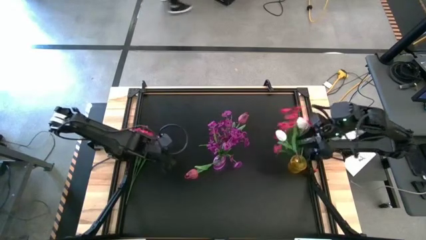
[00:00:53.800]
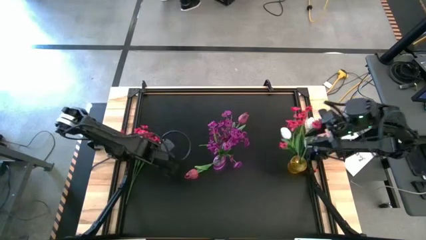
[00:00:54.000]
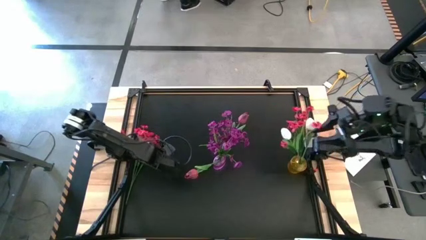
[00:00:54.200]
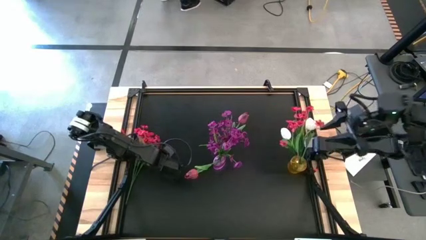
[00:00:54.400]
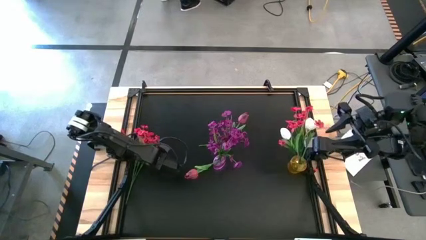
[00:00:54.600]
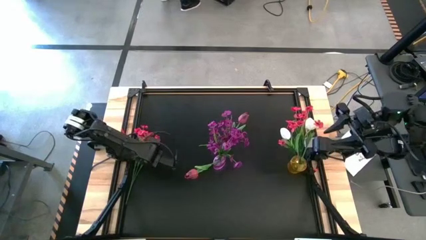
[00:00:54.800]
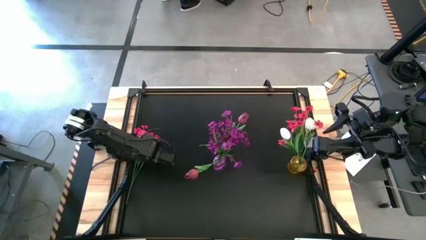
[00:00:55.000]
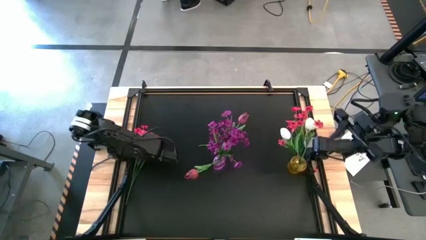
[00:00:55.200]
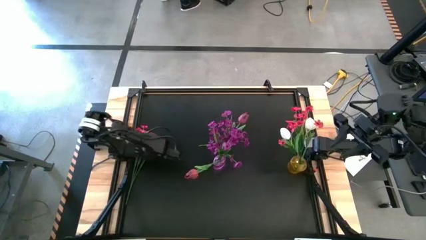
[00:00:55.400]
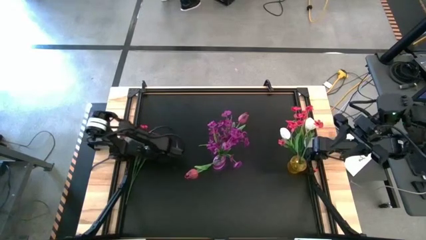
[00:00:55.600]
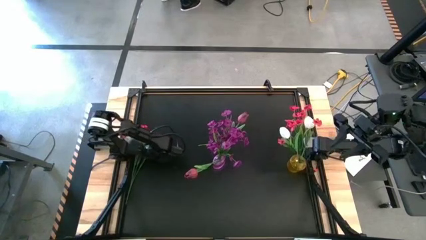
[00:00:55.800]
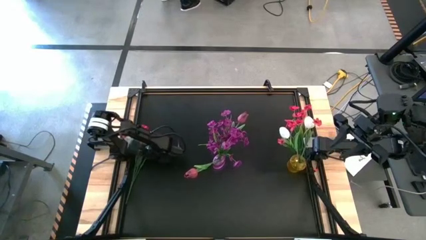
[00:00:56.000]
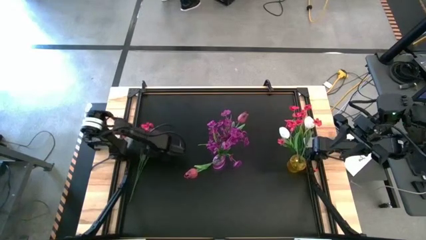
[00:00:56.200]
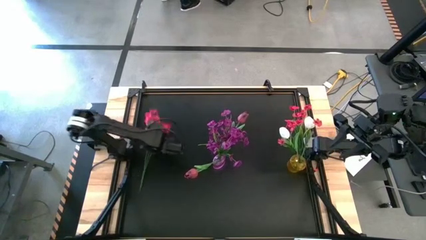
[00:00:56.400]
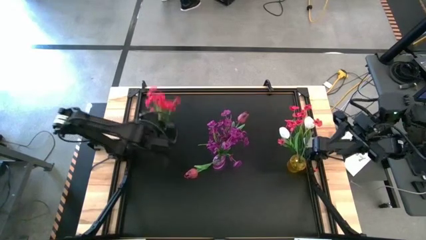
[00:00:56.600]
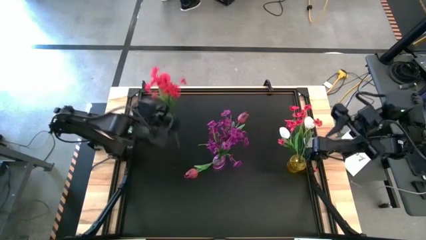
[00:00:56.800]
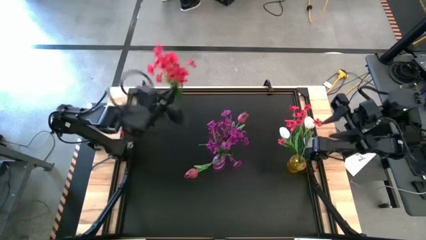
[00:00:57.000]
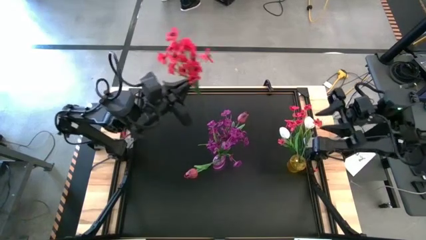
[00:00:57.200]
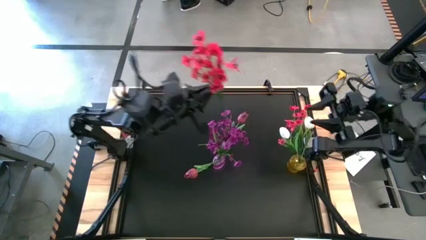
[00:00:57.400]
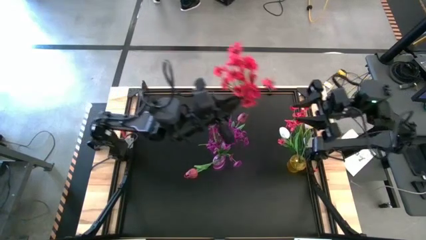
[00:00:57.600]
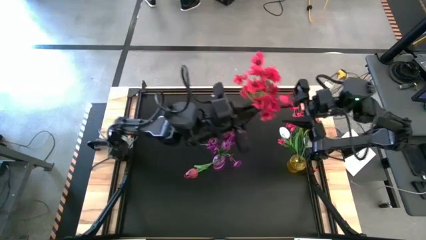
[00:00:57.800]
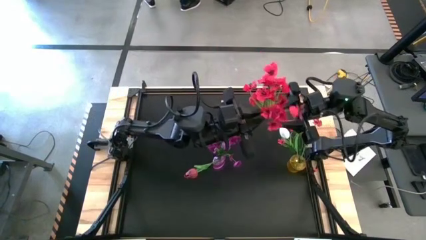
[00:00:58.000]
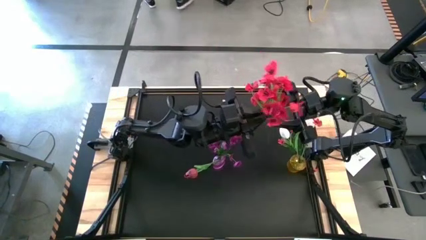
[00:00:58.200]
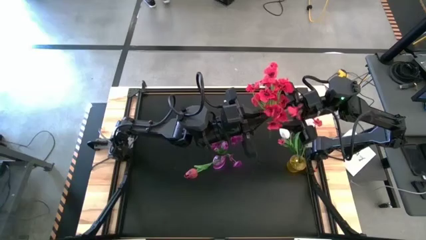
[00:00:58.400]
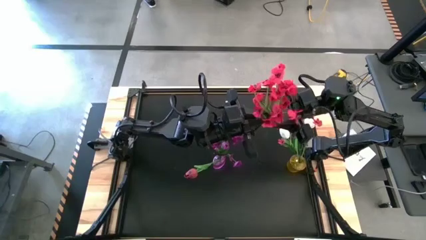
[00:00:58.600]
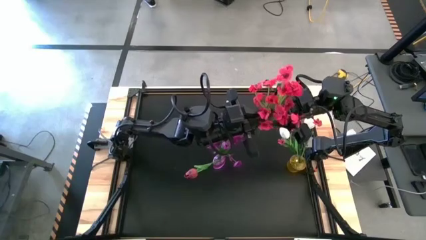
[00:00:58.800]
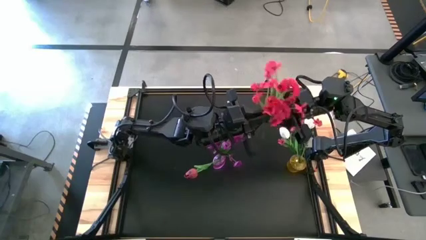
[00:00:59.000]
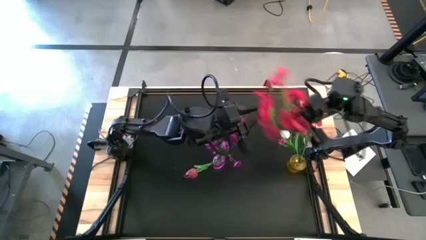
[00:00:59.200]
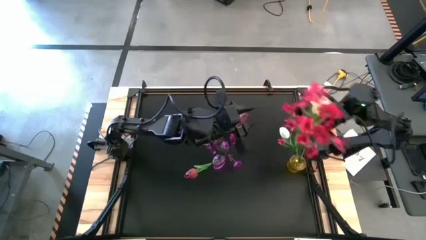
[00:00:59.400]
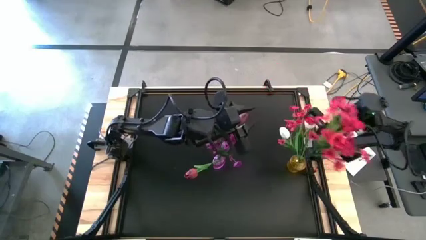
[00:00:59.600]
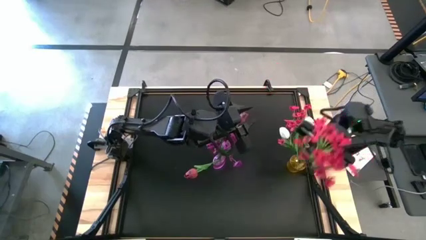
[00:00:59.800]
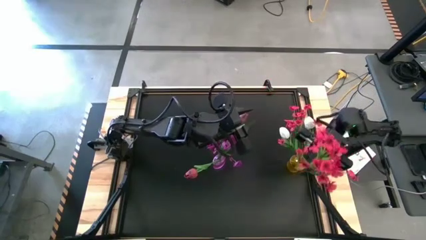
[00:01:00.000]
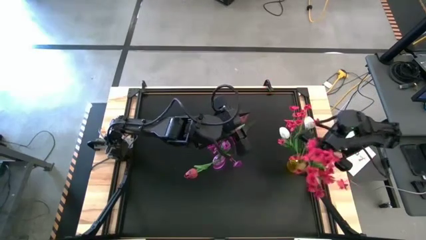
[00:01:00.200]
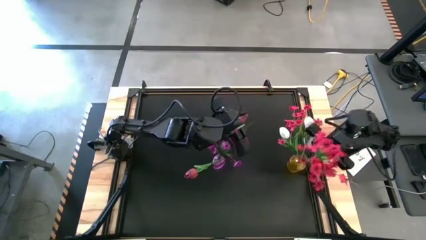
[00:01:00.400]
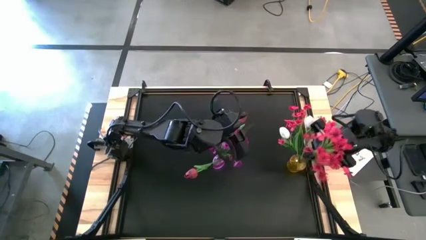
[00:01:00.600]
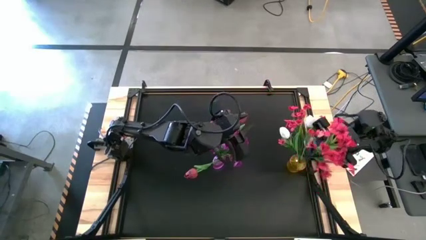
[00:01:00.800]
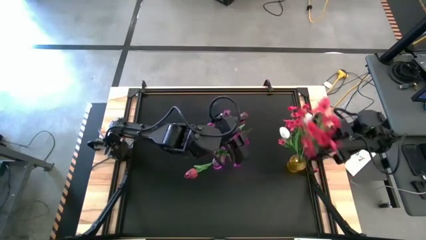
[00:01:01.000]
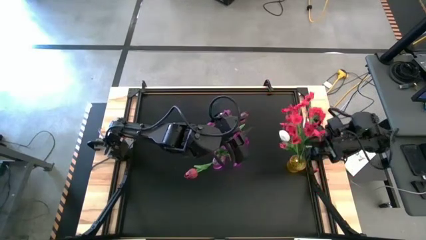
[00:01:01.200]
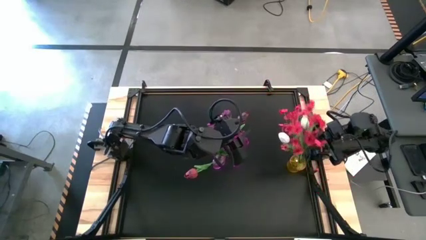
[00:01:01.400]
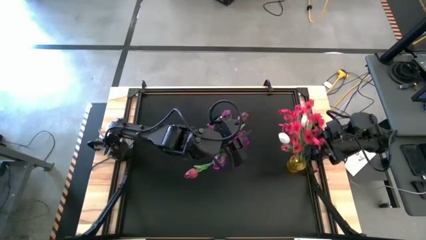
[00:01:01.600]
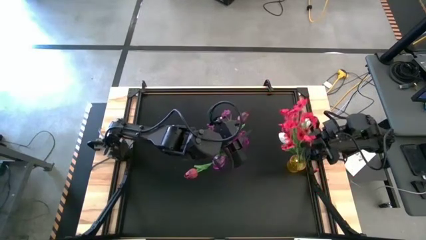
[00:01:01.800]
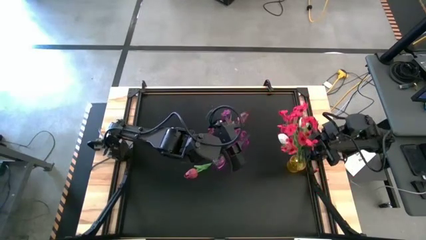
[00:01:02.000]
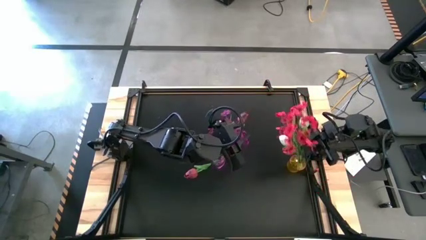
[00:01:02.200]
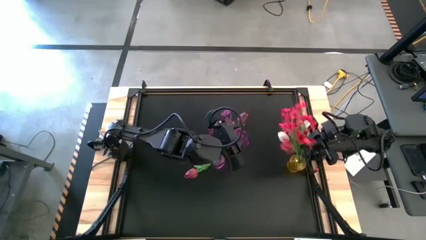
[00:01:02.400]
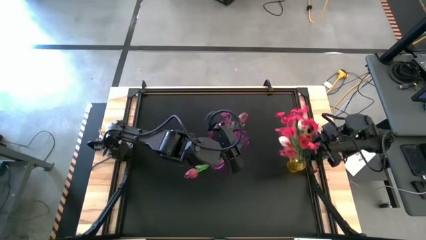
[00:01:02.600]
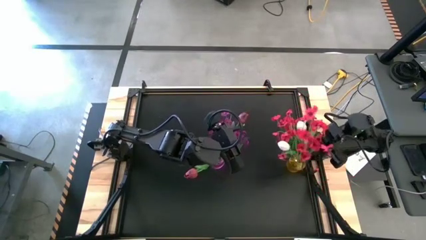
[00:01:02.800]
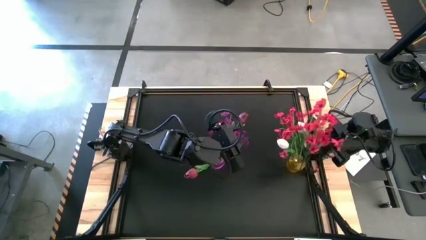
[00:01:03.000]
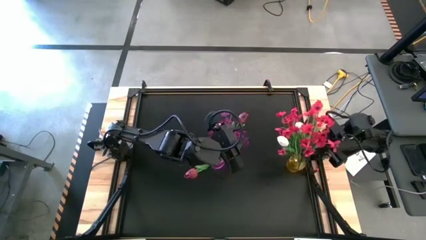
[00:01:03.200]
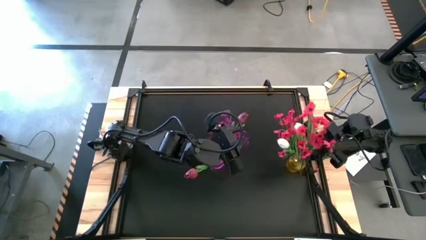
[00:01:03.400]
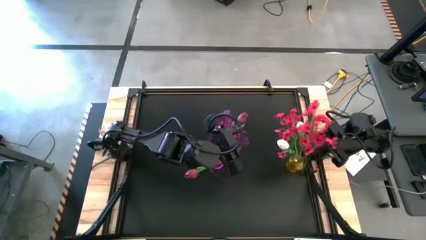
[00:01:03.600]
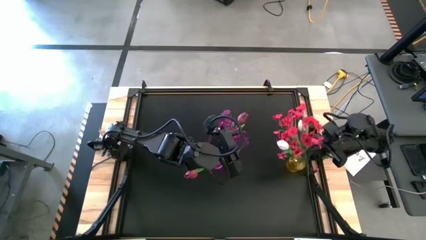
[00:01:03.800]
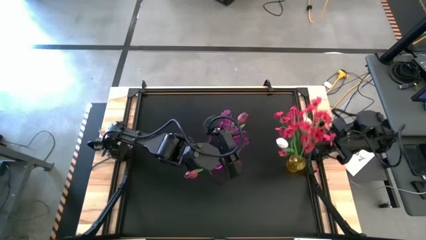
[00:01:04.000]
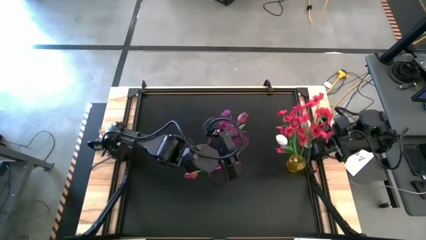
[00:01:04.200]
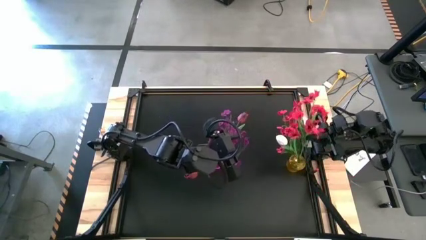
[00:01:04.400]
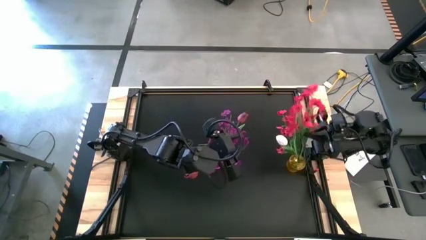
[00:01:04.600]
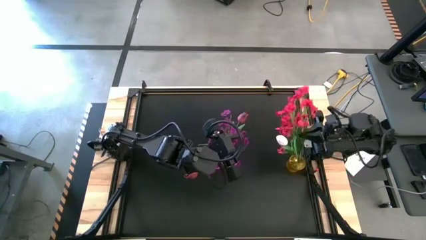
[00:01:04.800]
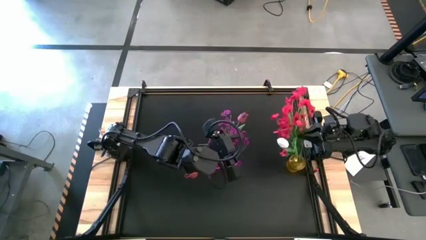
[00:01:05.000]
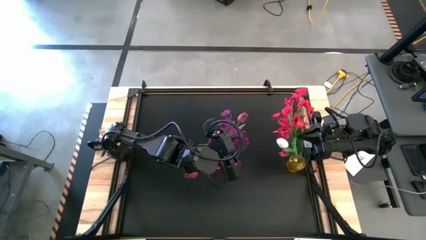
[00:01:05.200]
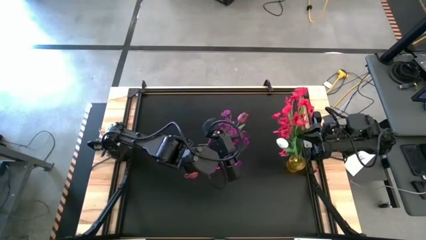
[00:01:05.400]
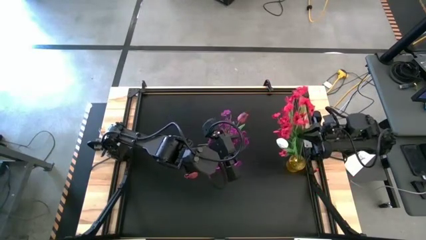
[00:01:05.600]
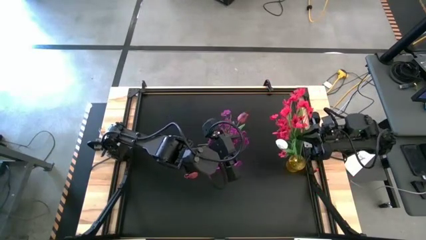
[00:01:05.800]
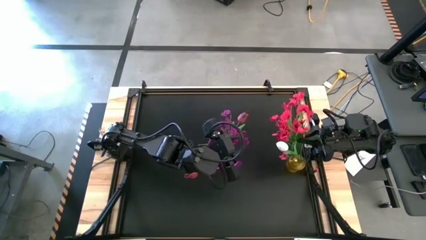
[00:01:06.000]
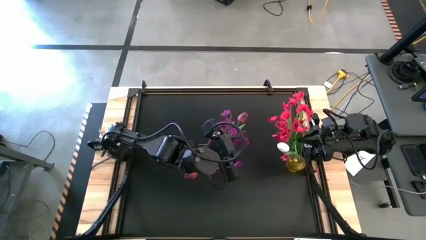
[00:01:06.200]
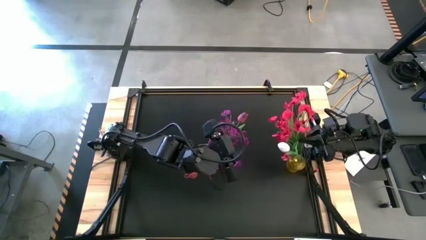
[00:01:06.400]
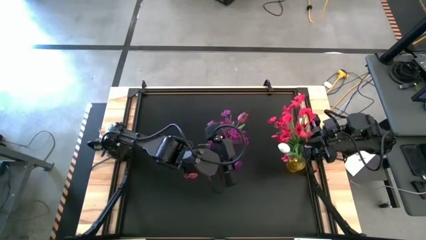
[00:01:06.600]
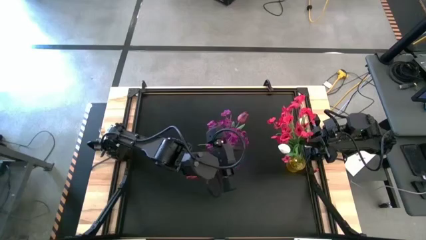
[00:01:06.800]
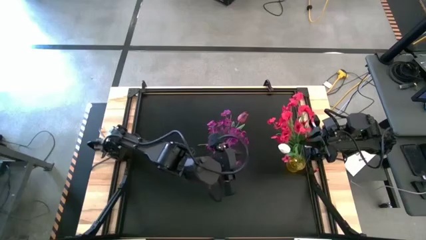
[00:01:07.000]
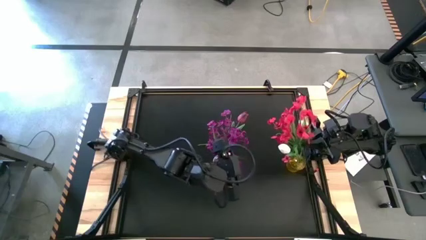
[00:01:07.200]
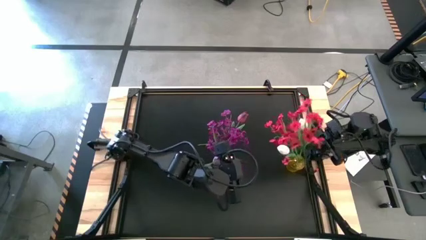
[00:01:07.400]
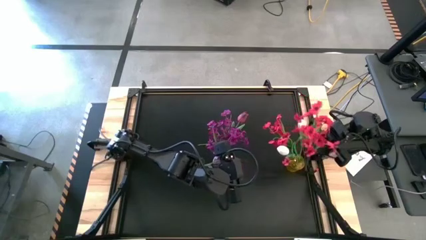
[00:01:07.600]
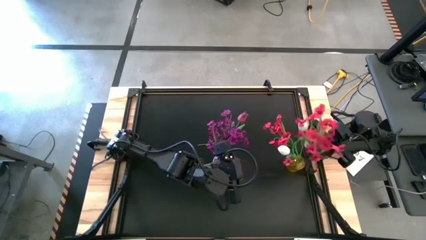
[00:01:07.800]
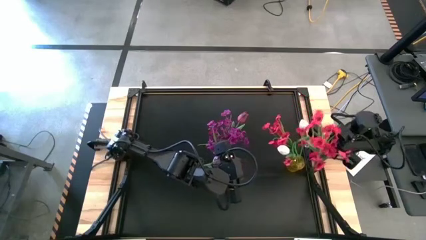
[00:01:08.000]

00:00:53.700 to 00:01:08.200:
Task: Sort flowers into vase by color
Put the red flowers into the yellow vase
